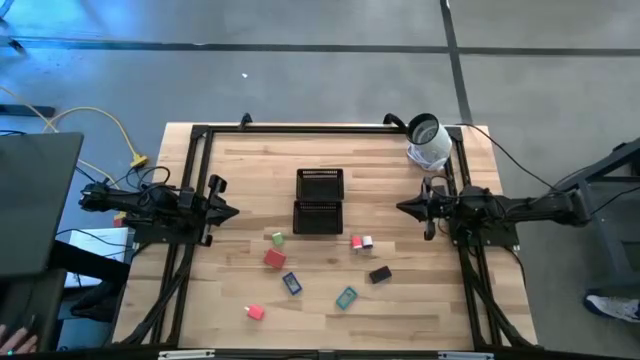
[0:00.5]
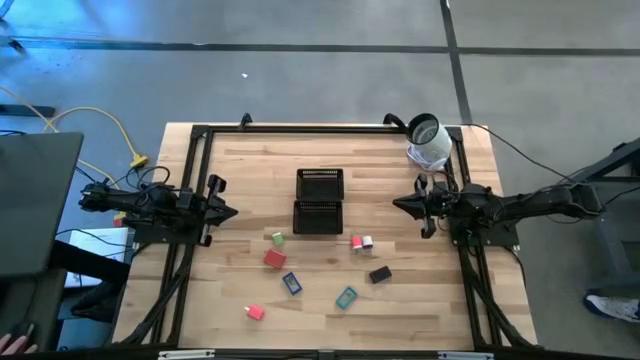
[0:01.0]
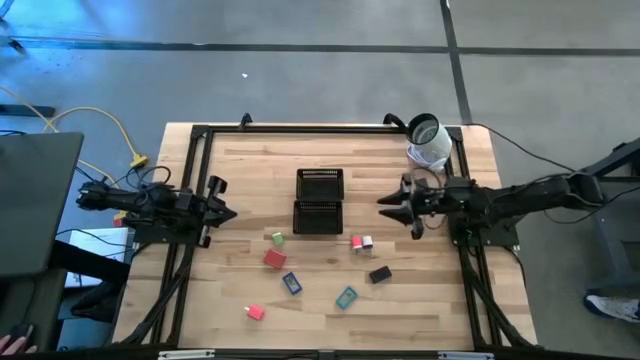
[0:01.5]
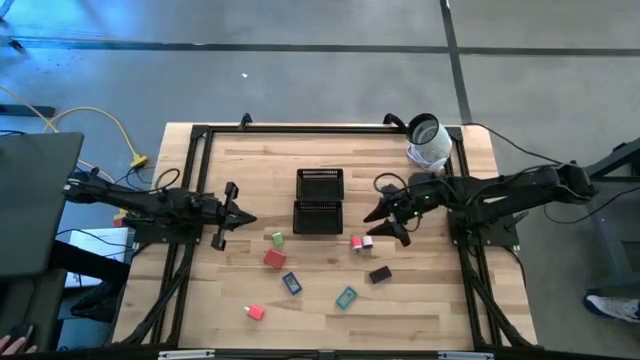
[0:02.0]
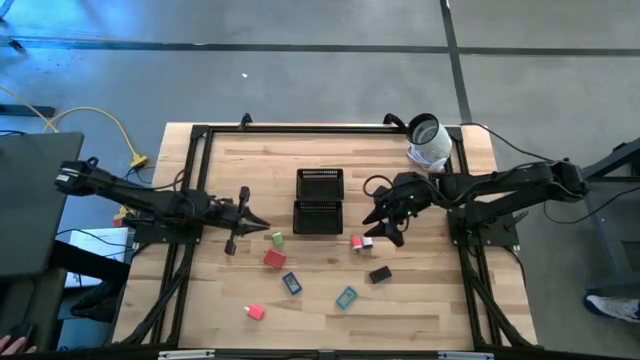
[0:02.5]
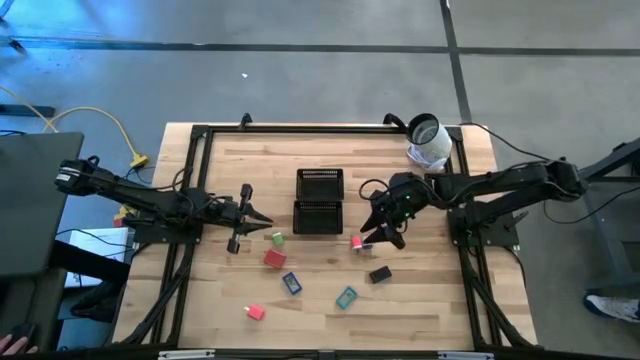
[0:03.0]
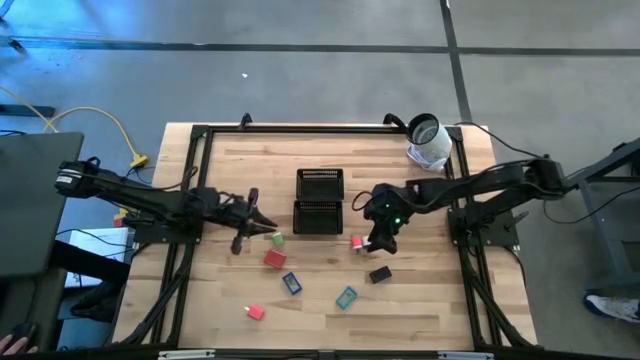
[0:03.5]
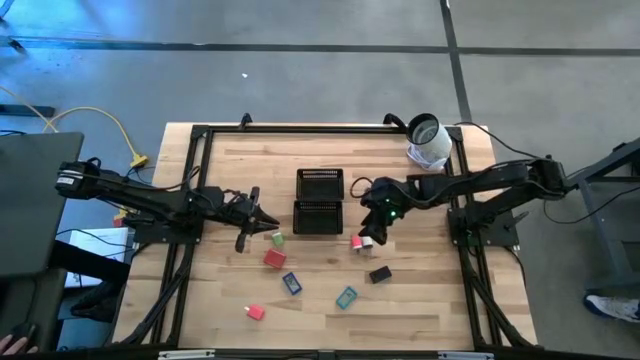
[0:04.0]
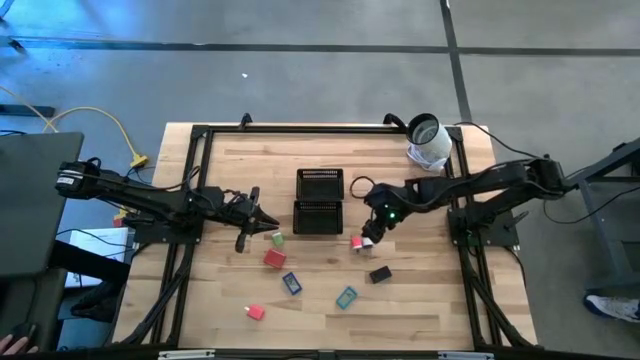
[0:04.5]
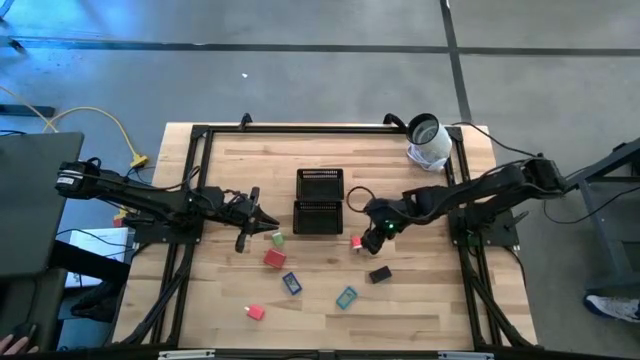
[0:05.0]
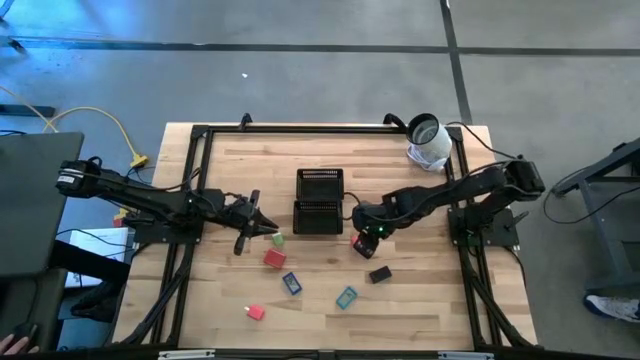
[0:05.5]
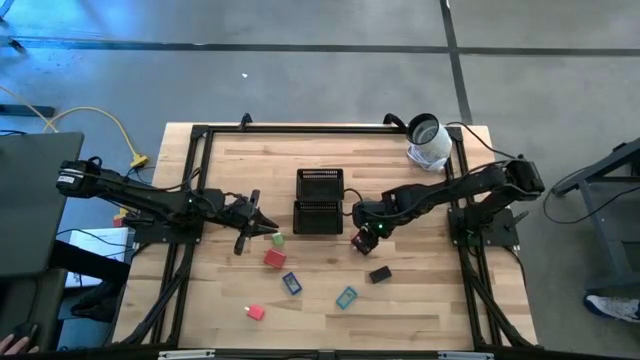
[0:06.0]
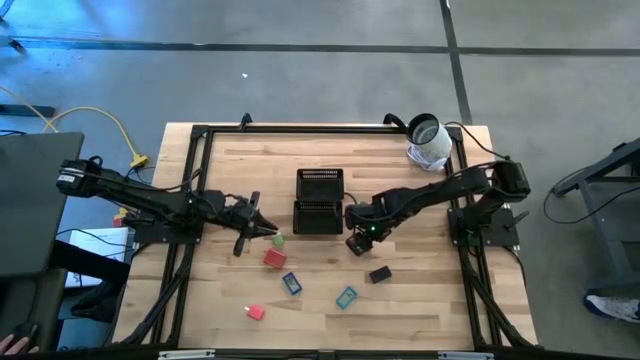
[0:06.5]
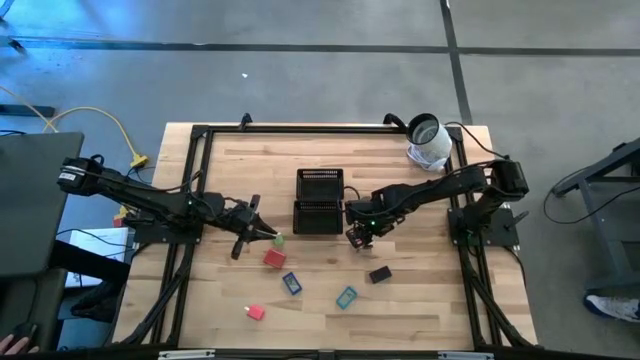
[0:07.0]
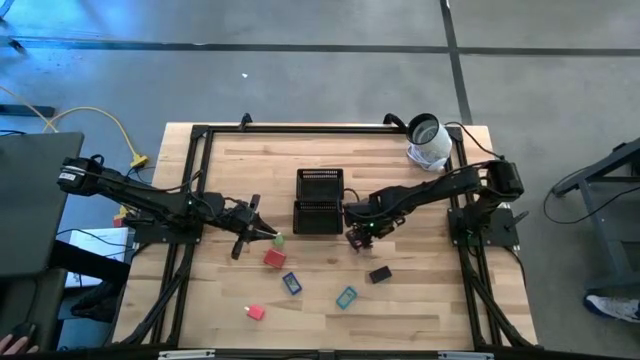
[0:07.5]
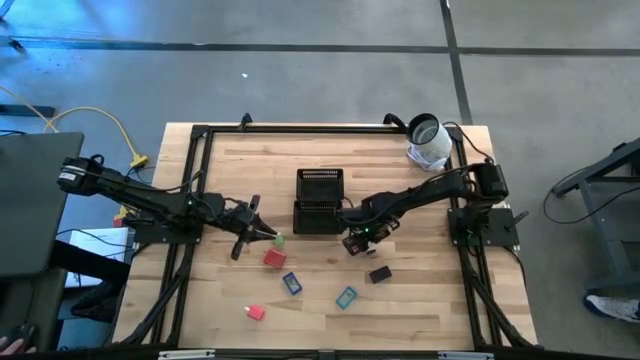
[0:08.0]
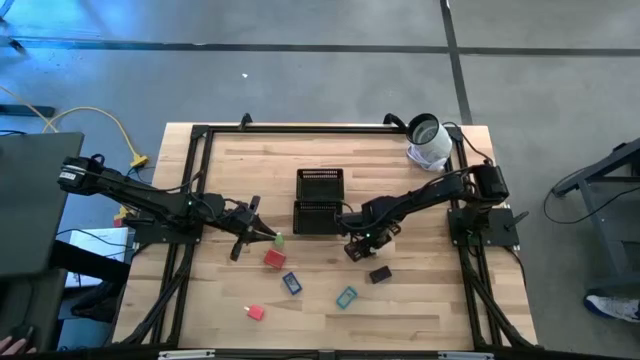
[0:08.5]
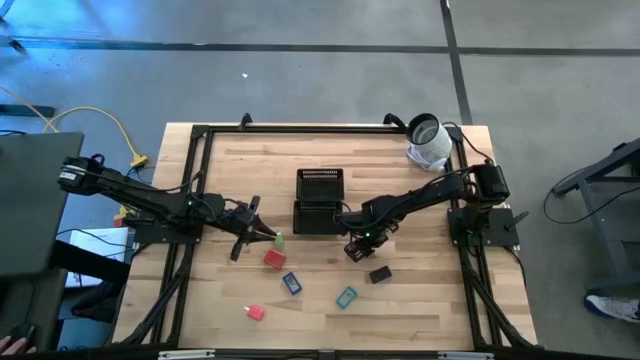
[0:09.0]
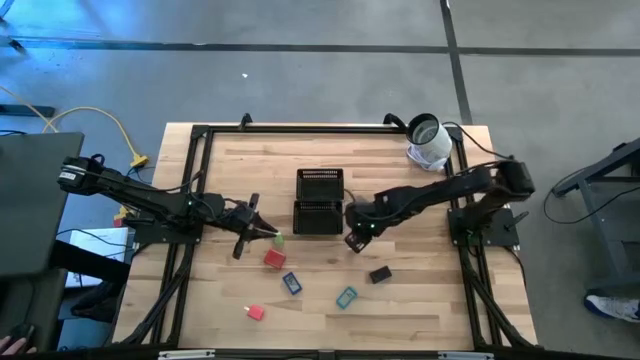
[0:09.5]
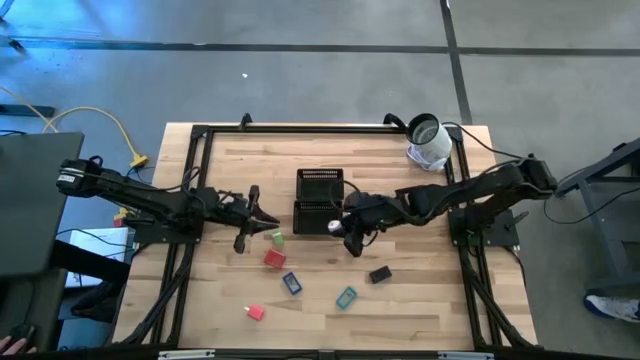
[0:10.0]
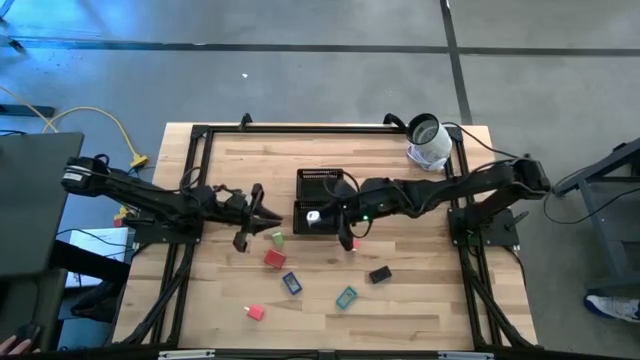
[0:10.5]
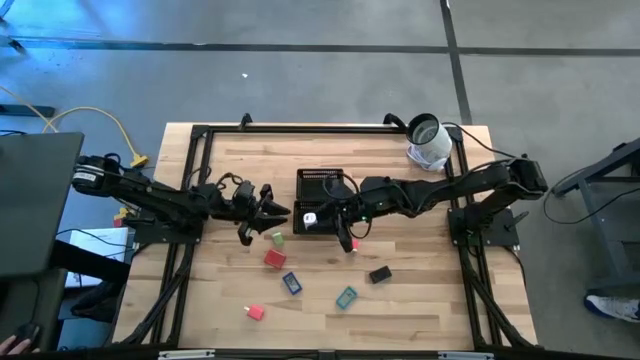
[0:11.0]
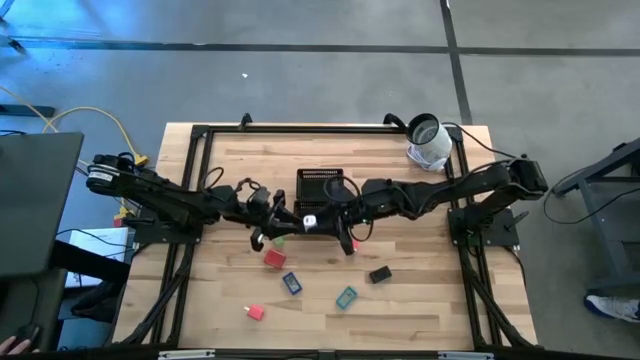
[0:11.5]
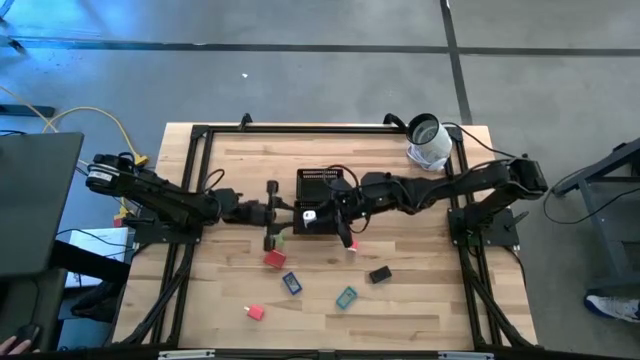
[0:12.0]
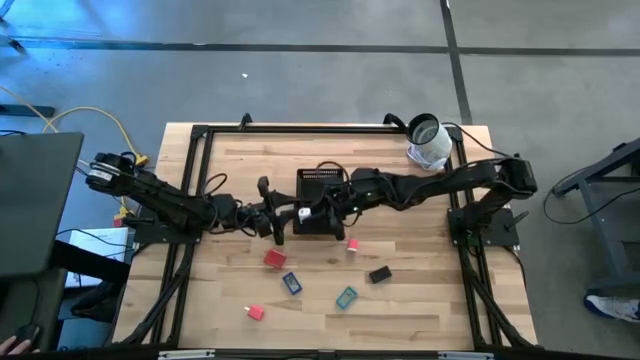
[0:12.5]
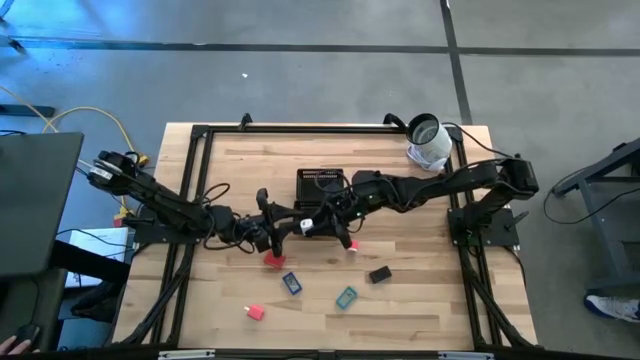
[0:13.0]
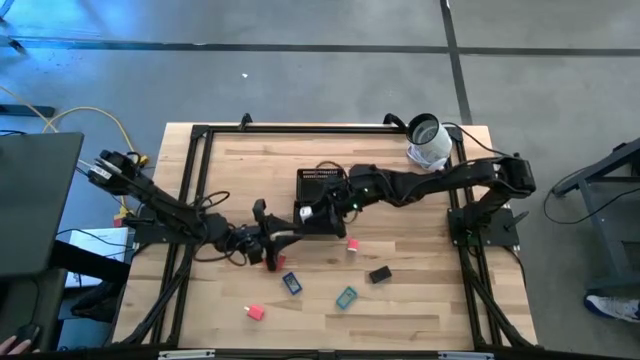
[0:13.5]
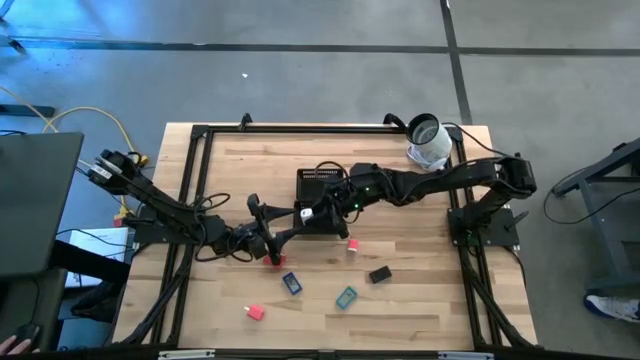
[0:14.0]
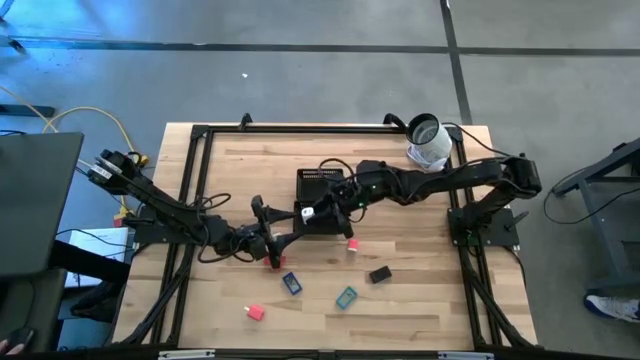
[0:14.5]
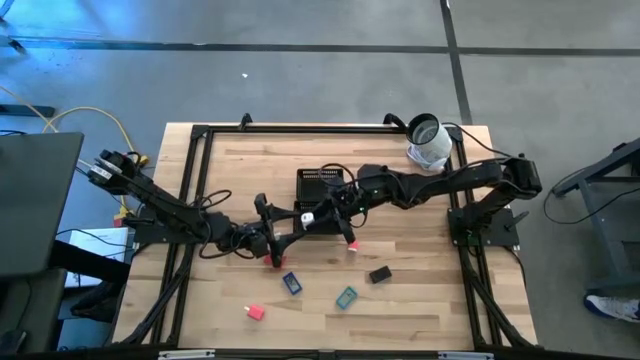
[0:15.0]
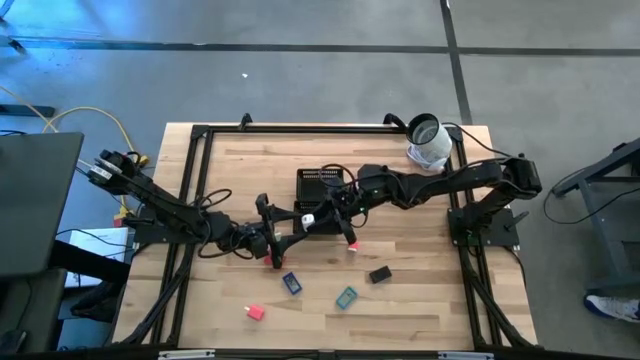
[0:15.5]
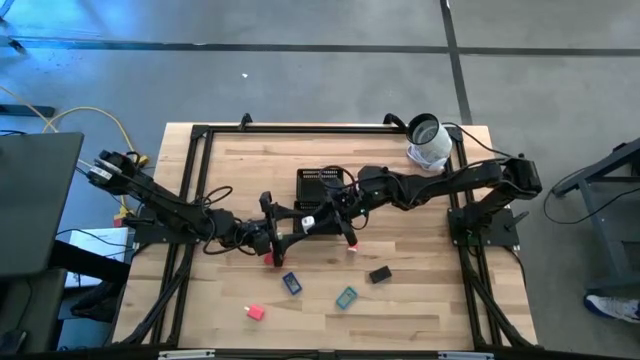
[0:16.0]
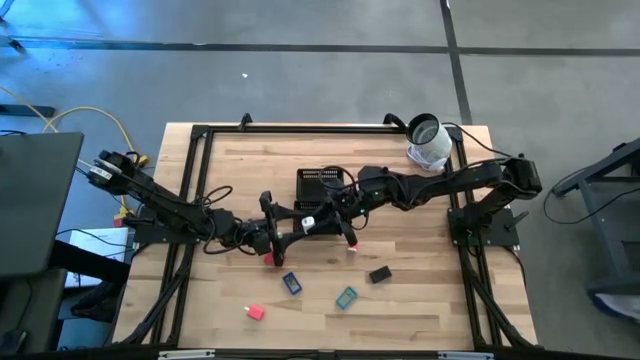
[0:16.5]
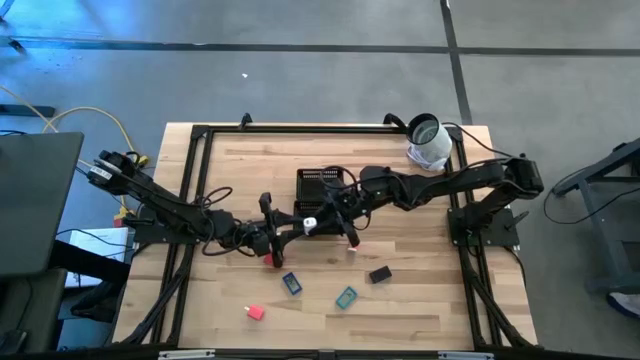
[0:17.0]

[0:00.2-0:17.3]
Task: Pick & Place Office items
Put the white charger adapter into the top black bin
